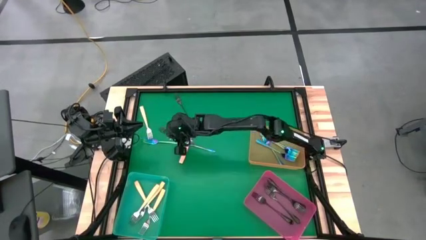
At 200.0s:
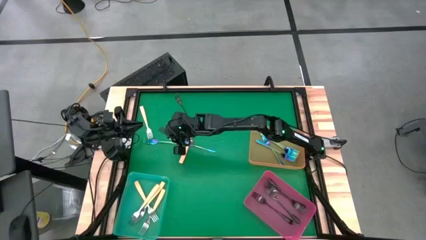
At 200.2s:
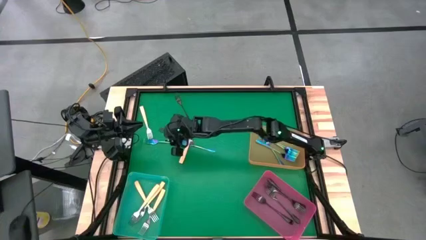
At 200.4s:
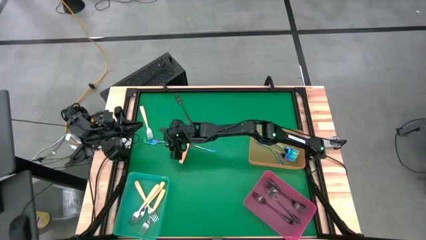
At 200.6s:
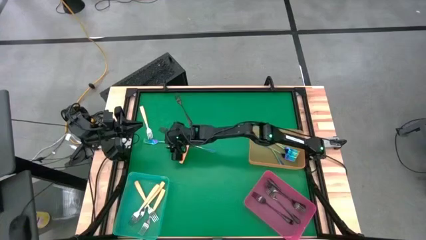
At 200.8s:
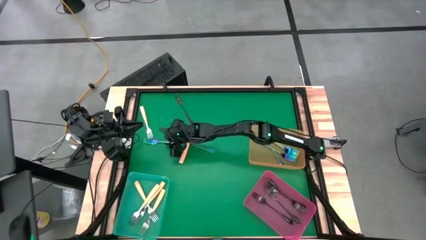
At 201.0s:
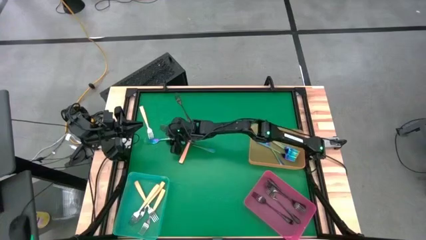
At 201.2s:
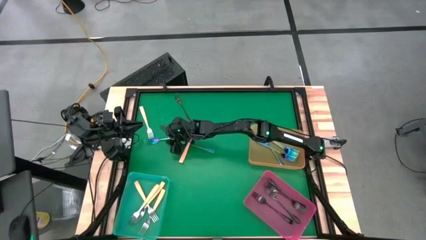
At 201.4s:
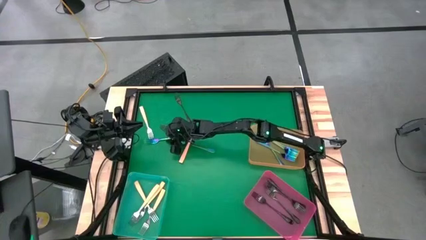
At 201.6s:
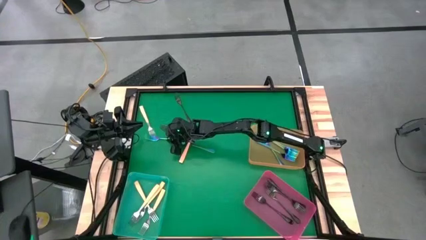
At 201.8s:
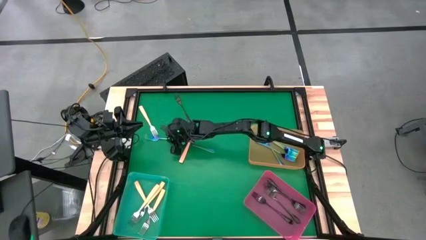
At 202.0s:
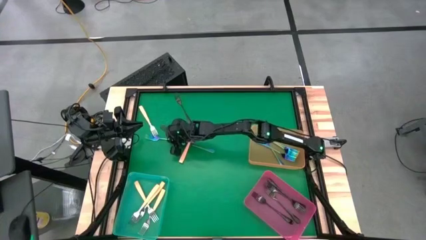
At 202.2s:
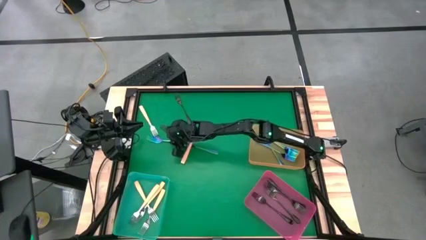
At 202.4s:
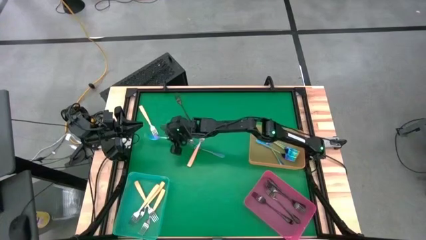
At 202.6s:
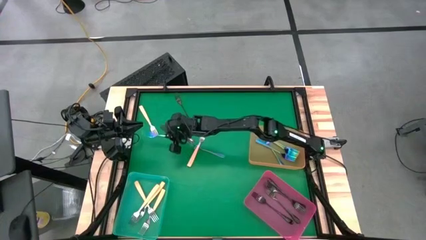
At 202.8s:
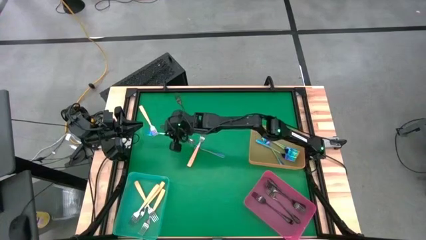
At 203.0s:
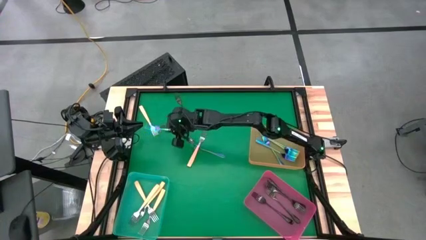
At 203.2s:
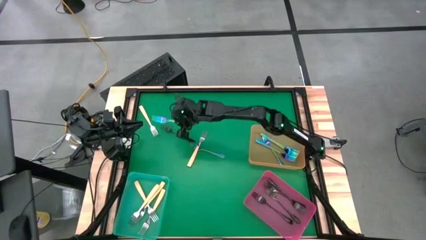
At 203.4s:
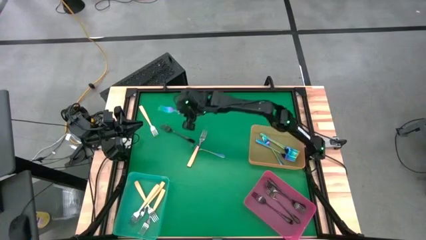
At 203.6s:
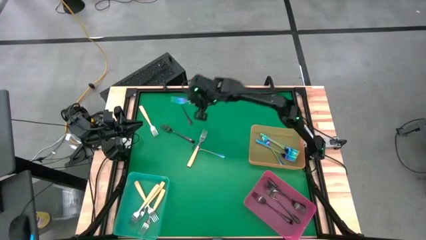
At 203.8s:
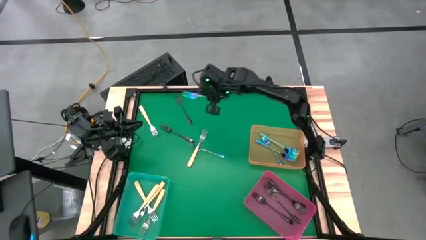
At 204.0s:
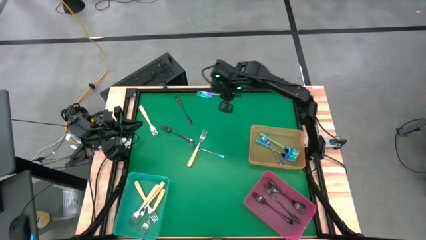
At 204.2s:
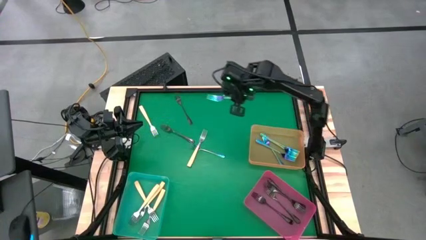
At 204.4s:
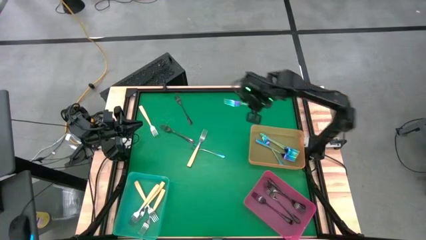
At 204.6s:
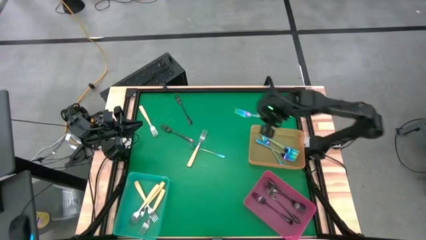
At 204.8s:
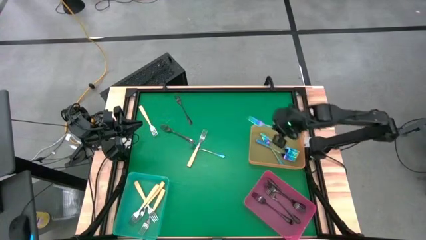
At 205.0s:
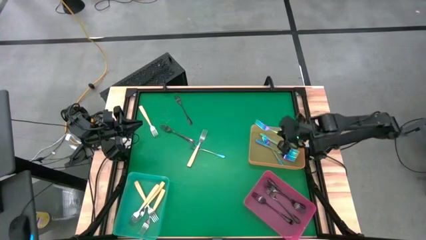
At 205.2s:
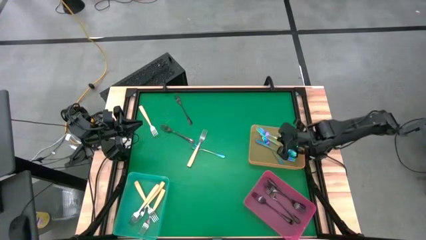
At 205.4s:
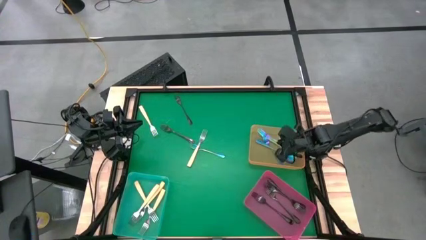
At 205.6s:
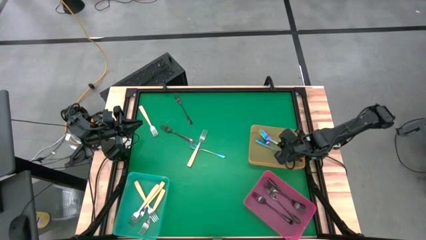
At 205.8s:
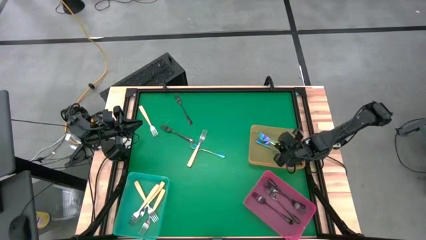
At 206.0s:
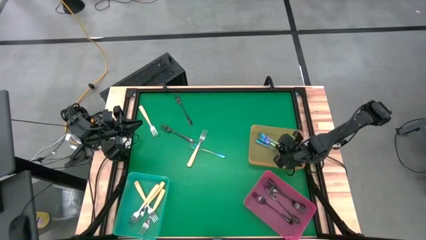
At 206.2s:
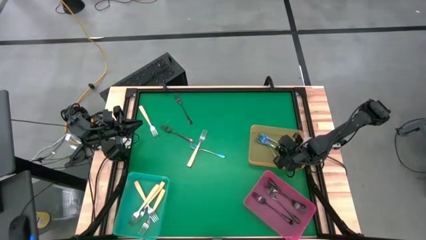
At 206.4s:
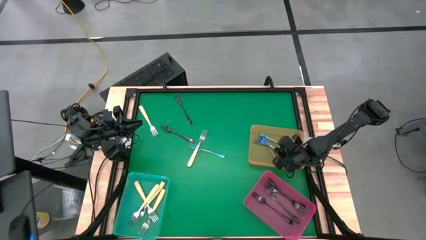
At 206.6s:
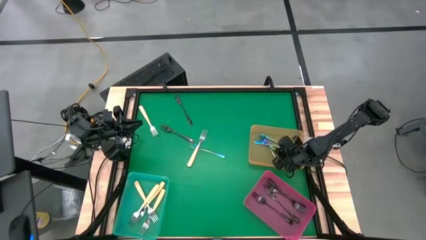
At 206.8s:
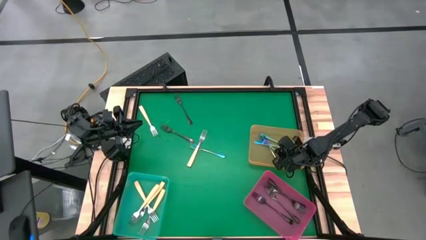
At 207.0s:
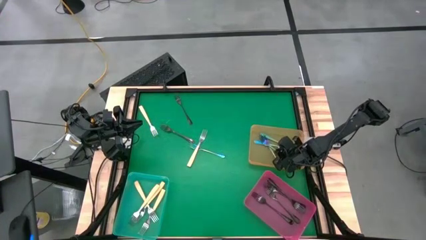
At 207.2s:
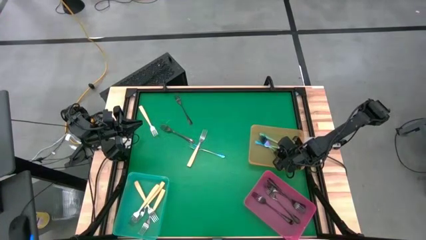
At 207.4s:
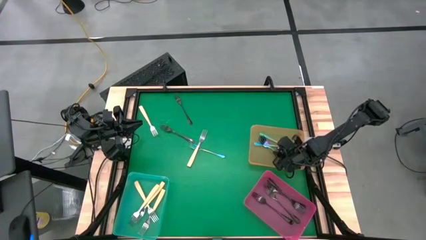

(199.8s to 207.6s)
Task: Sort silverware by color (type)
Put the blue fork into the orange bin

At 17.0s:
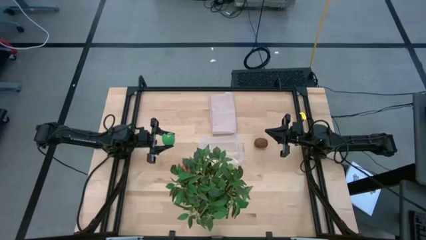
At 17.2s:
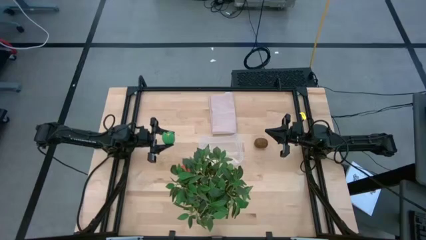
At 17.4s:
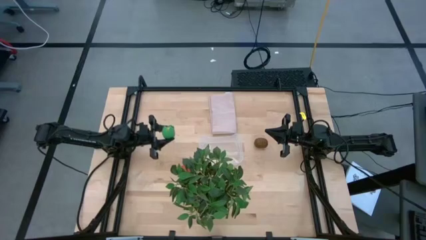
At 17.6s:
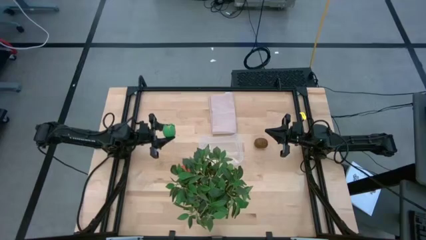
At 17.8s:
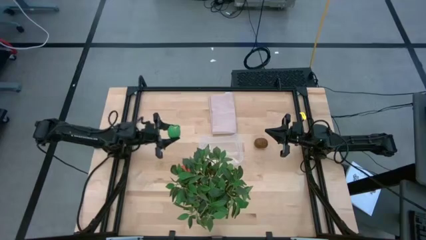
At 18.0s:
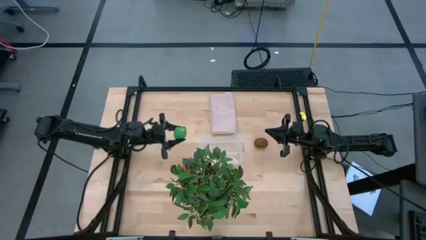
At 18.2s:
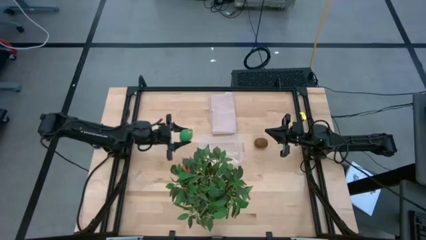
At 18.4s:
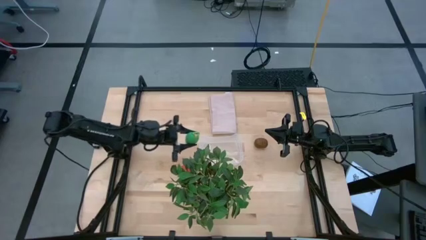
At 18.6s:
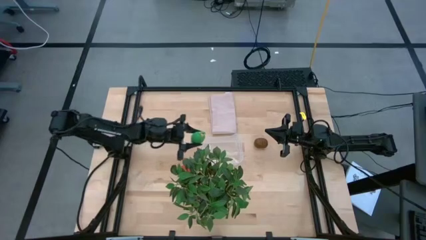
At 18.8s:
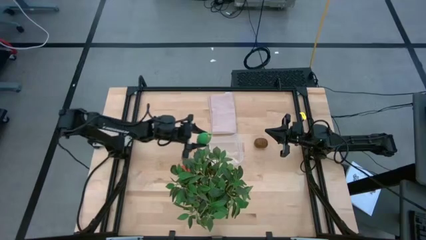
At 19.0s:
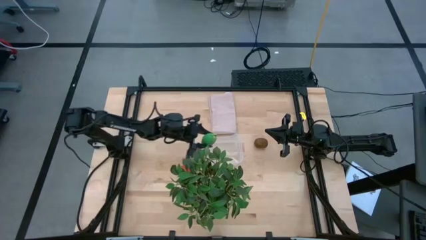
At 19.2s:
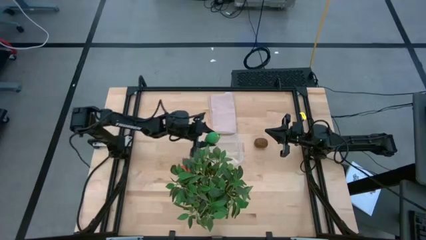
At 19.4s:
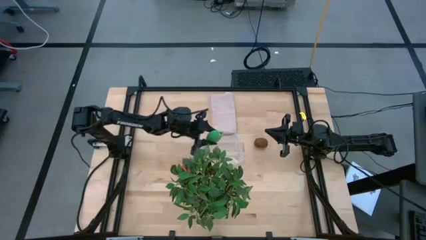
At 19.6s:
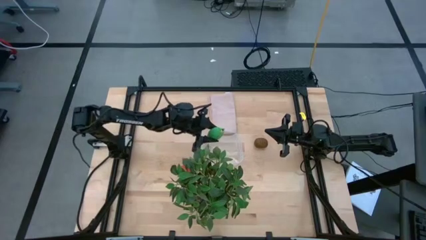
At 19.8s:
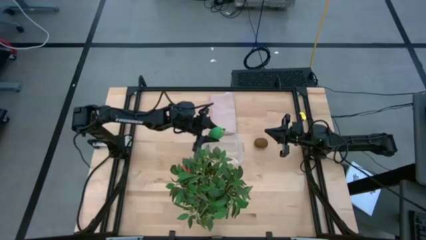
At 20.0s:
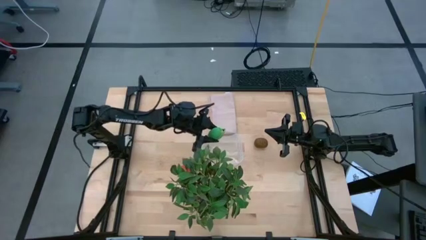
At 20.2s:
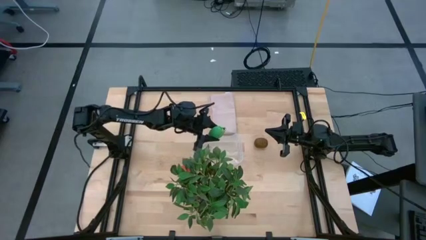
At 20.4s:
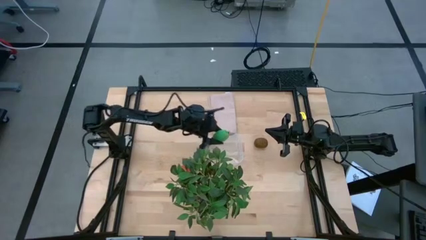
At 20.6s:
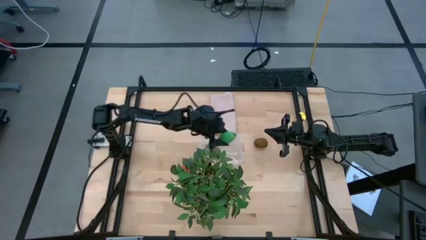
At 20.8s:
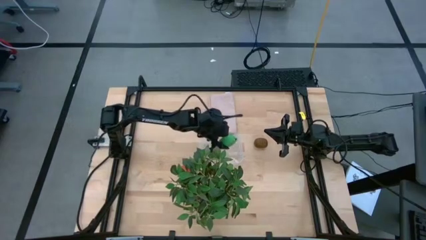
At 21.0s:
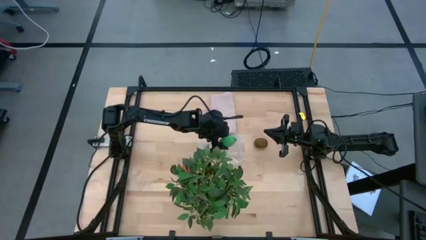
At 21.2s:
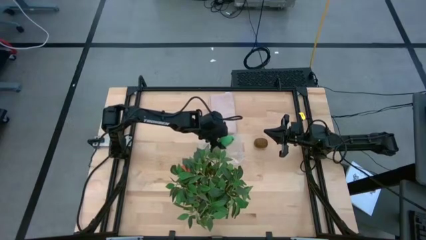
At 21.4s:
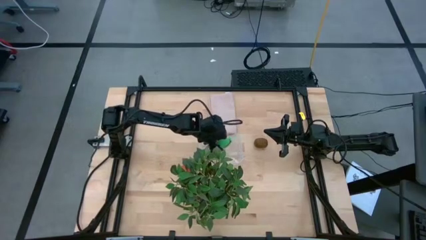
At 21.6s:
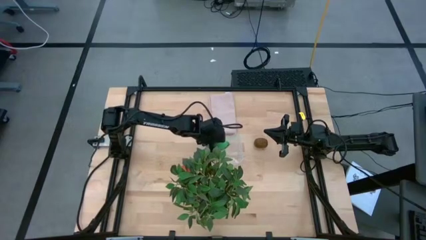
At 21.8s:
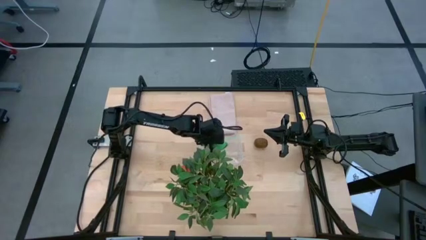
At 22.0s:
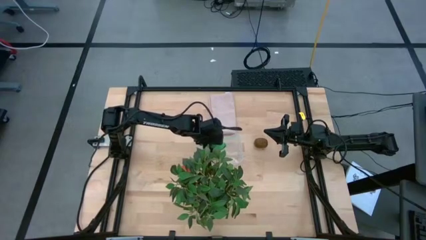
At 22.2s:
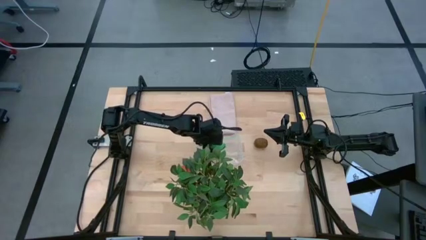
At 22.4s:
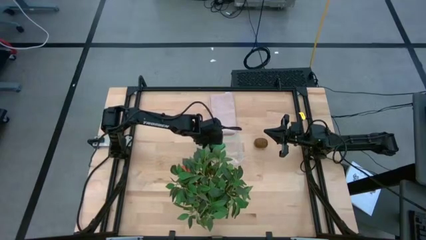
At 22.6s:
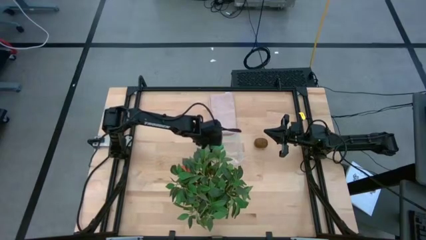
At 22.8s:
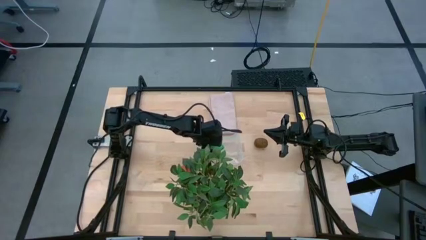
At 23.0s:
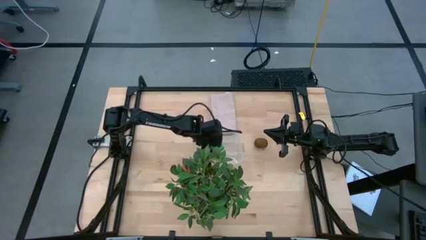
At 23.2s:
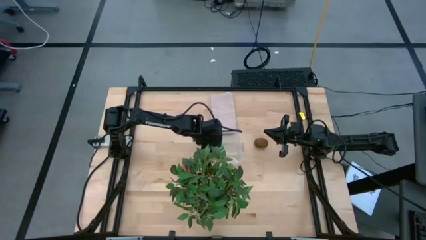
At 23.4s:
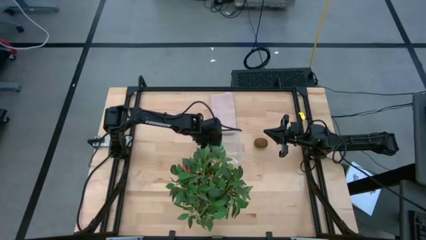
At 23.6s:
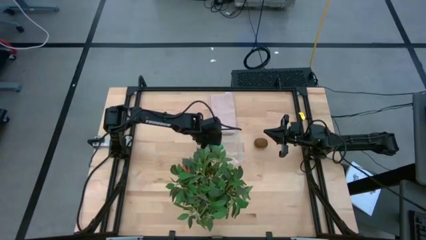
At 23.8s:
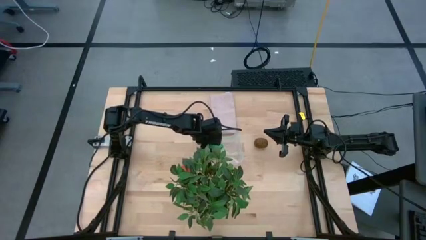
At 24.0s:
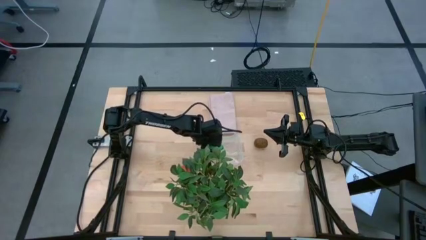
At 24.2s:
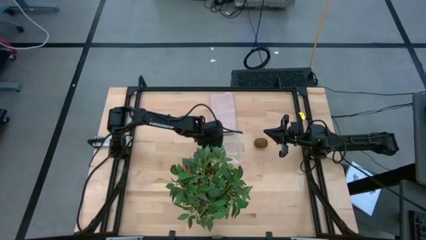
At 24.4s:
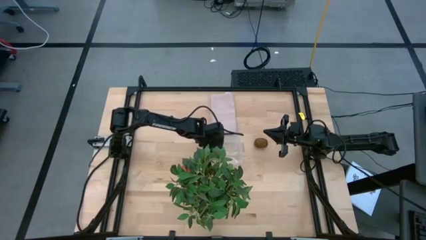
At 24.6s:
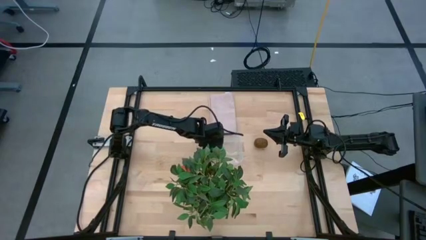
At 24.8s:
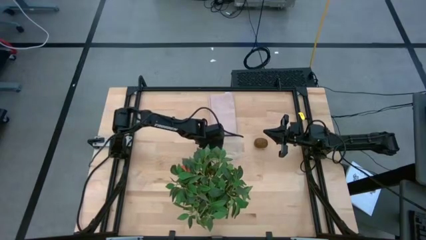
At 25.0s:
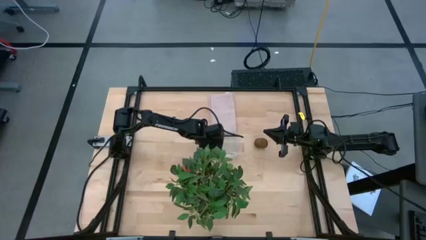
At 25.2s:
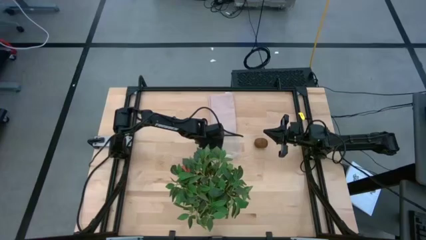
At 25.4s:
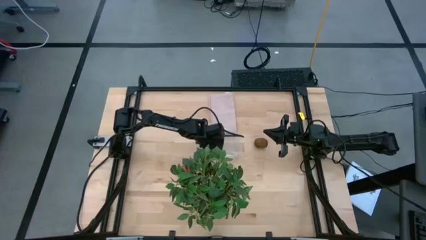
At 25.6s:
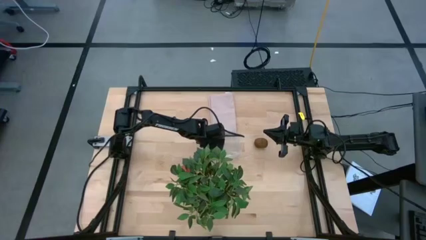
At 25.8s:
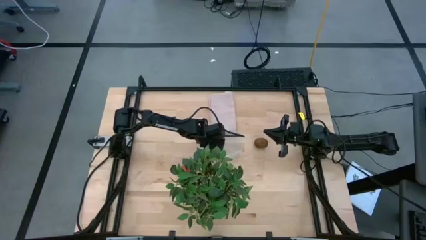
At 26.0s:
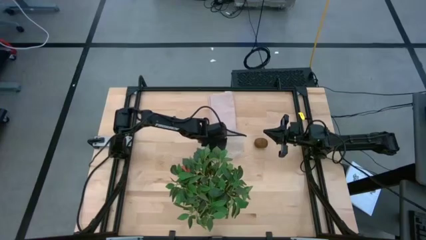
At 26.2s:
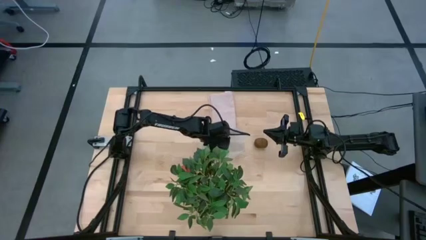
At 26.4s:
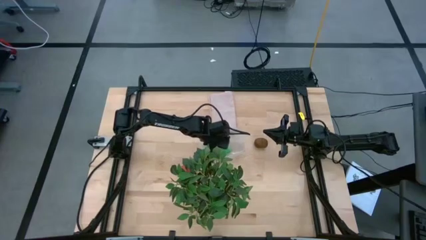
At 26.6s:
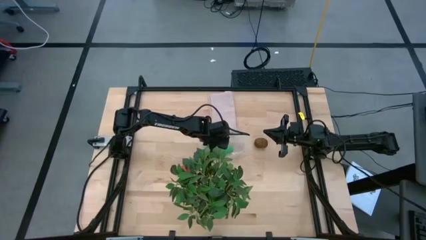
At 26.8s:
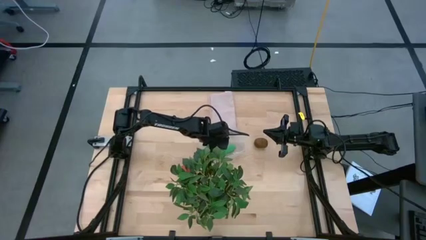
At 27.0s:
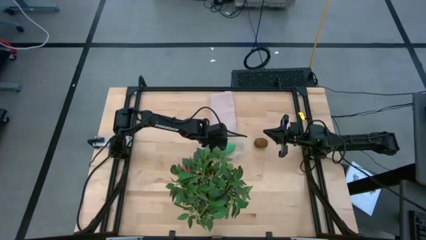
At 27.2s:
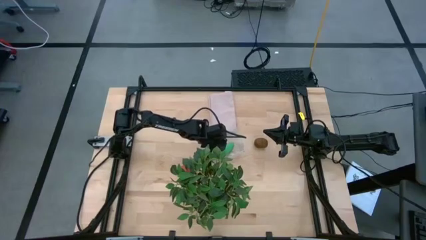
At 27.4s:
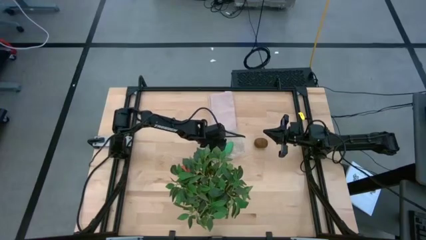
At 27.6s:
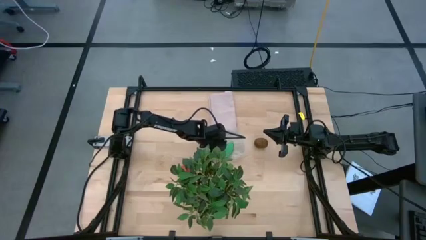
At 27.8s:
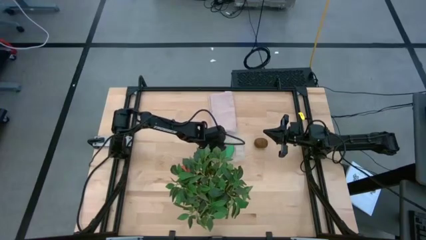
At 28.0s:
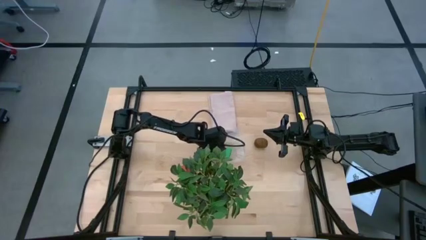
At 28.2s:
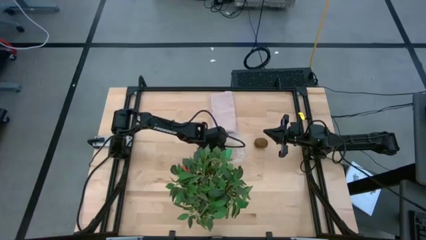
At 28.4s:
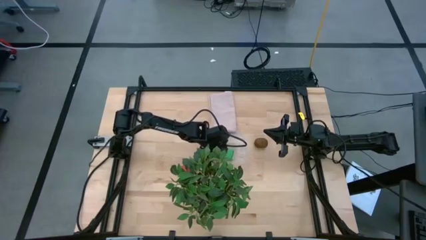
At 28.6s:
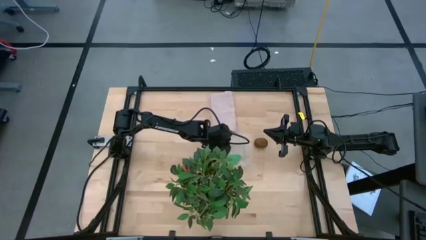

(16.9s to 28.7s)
Task: Pick and placing Produce into tupperware
Put the corn into the transparent bin
